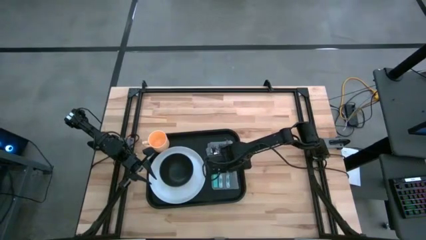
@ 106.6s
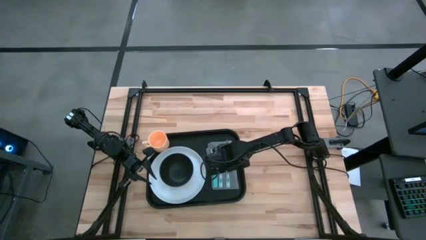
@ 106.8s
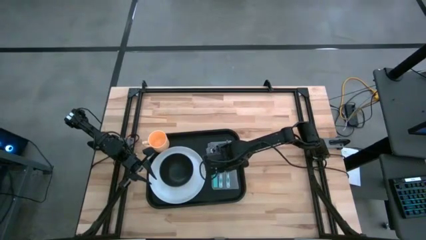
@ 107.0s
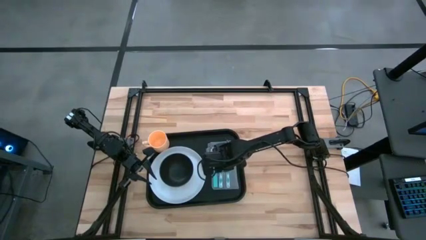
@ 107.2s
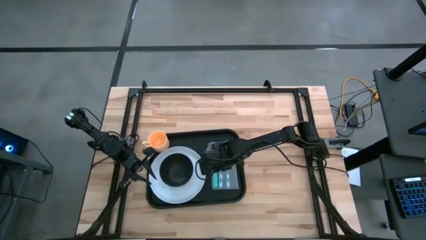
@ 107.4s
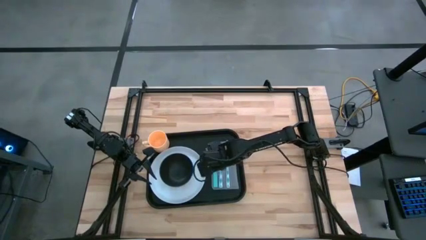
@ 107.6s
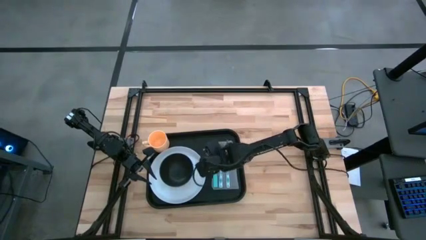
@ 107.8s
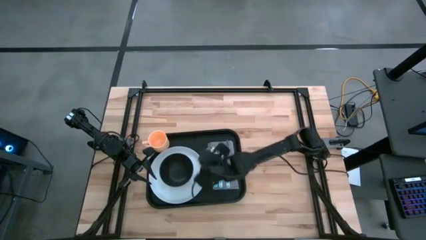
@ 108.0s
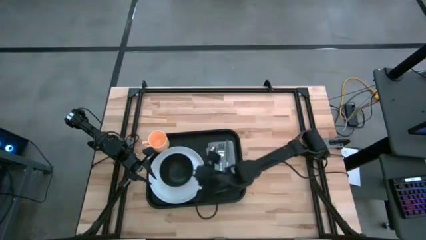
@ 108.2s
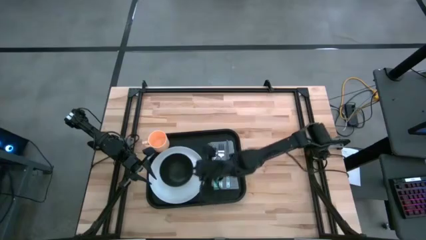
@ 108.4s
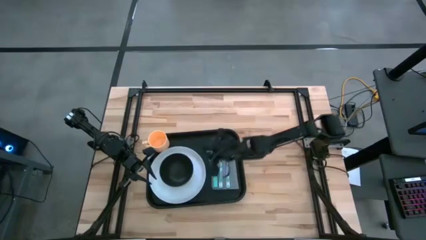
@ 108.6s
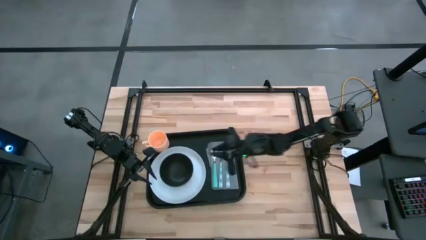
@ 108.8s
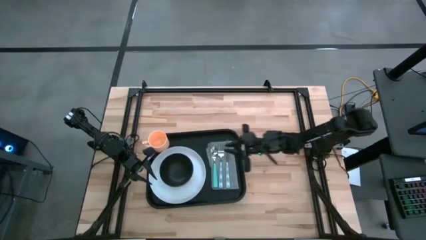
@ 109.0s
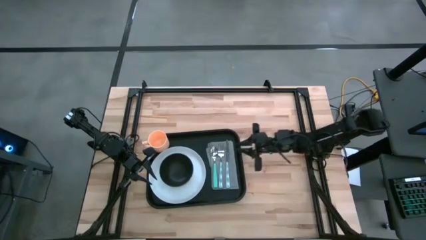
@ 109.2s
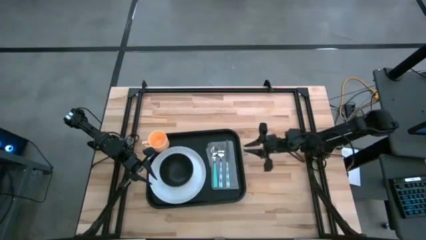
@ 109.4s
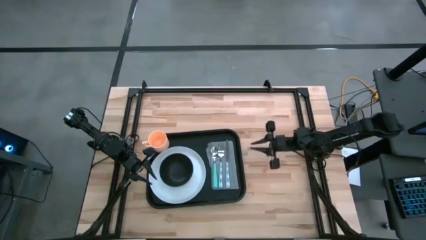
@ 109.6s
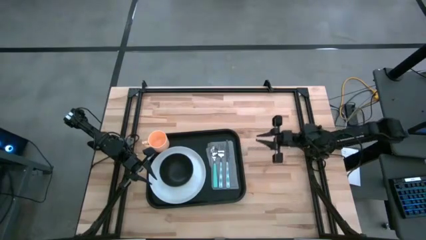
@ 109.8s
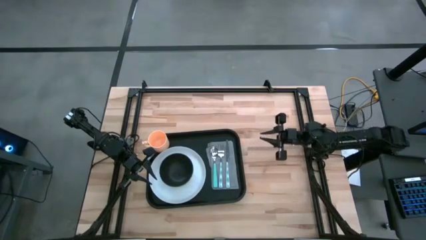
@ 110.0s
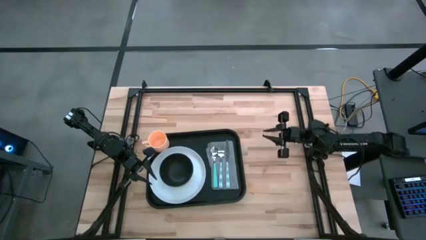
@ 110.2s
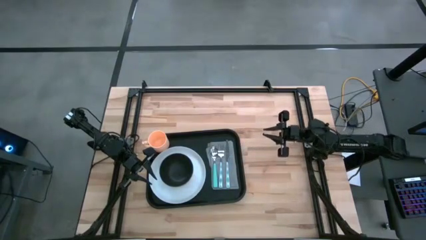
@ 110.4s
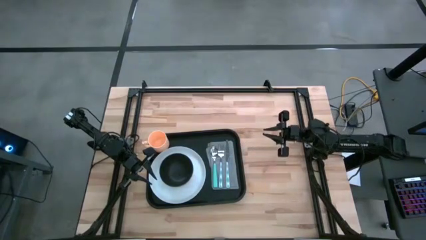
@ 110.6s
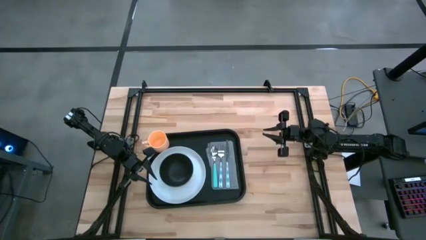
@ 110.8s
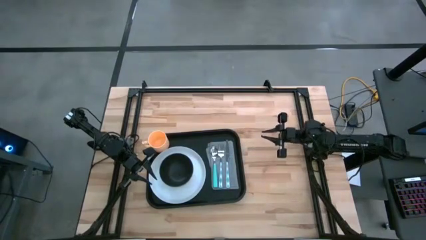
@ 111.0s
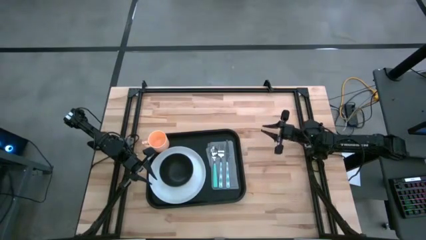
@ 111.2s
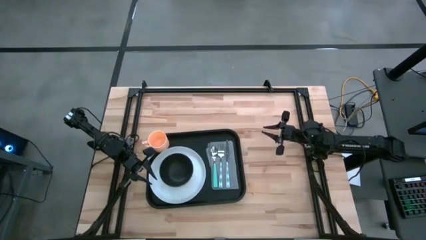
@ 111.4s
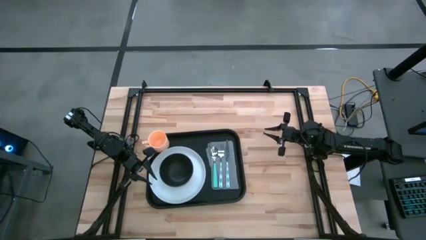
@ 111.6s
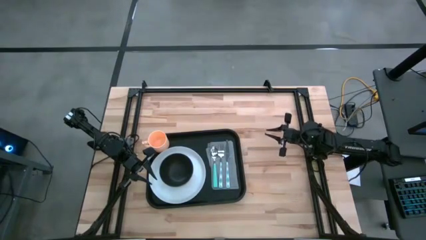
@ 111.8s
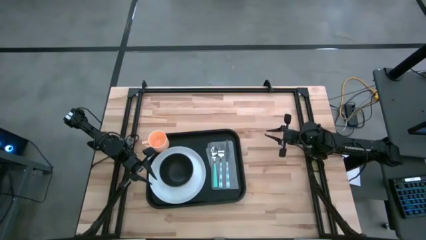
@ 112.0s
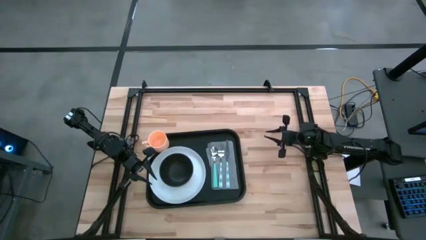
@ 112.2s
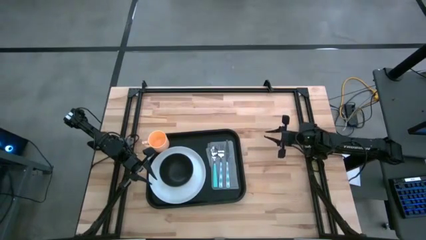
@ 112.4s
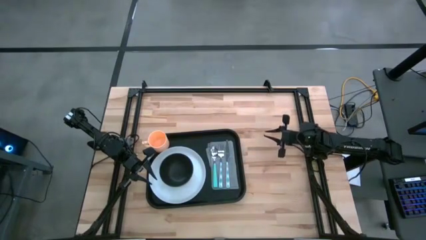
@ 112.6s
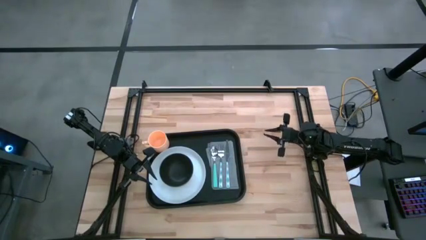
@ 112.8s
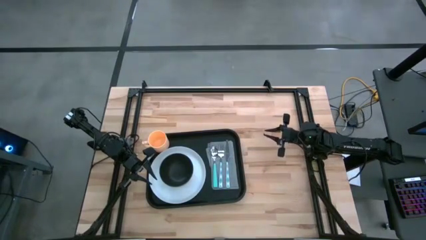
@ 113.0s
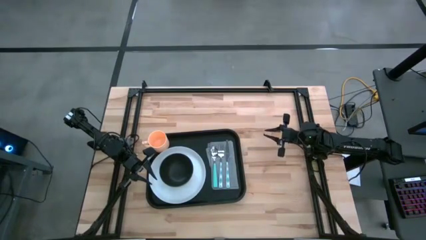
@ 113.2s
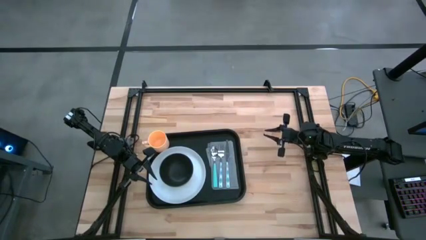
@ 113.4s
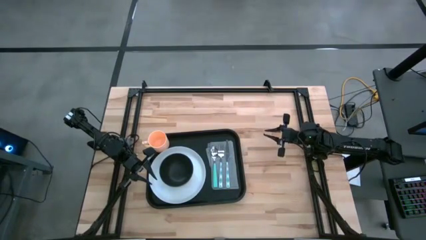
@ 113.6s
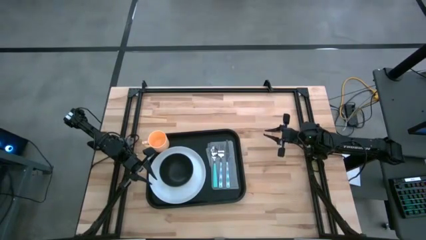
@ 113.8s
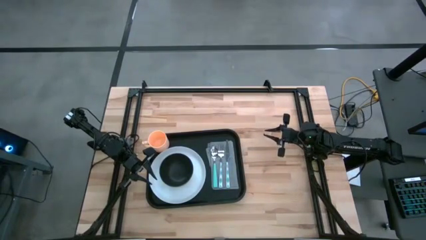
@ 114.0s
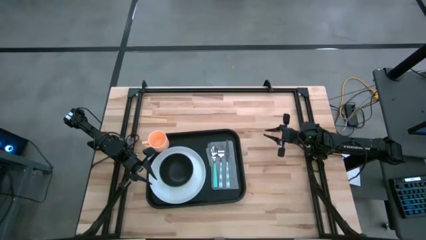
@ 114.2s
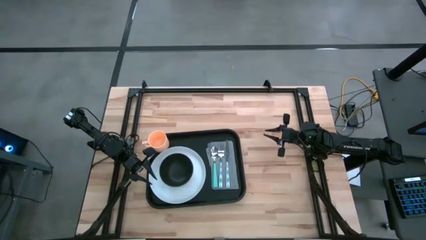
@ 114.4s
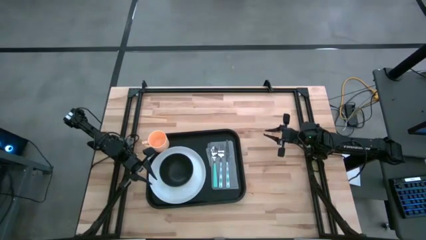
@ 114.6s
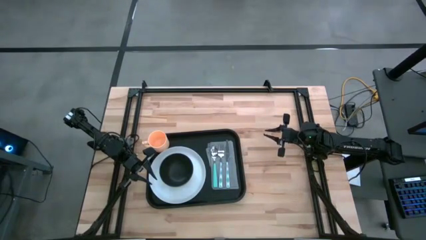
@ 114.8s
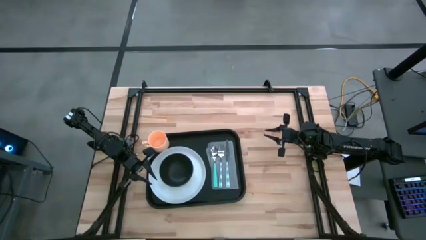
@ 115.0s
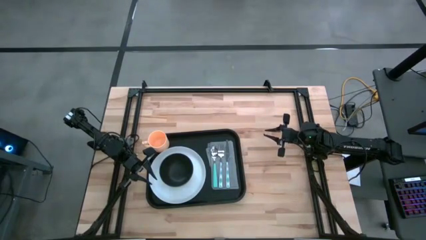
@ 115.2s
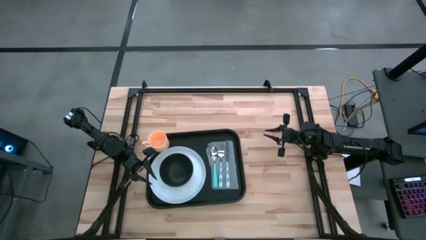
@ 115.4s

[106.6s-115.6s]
Task: Set up tray
Return to Home Position
